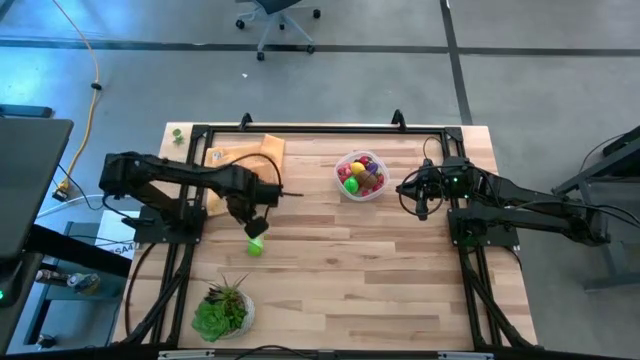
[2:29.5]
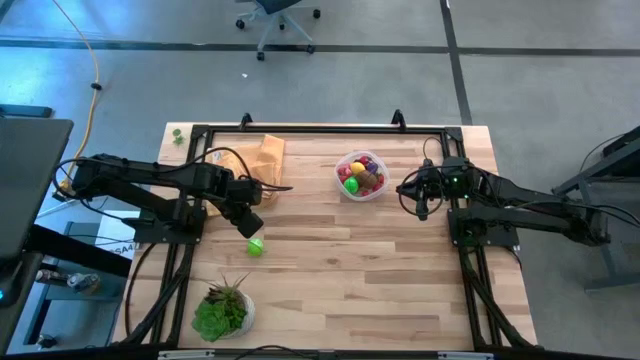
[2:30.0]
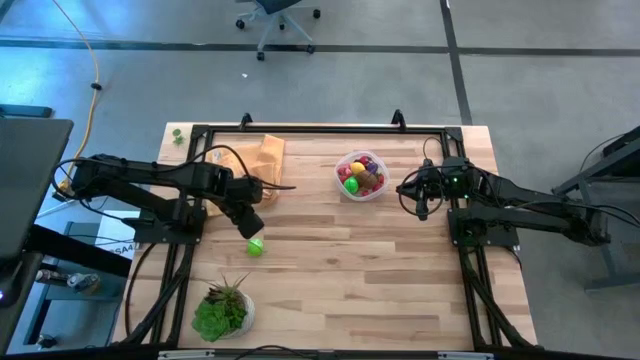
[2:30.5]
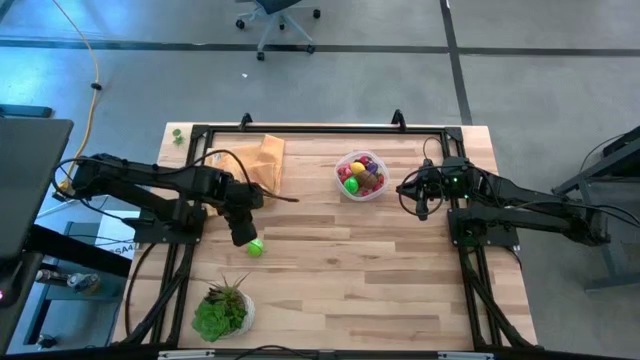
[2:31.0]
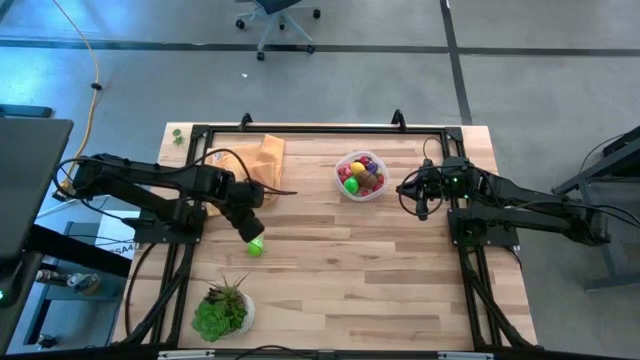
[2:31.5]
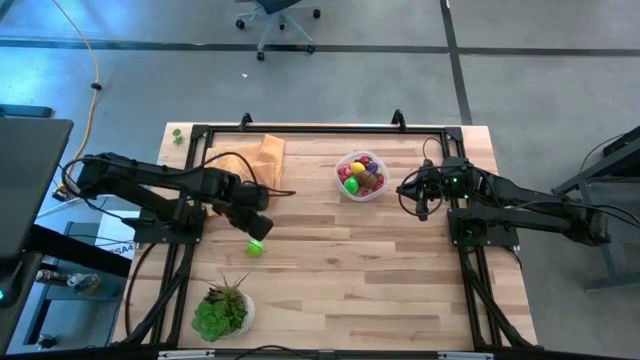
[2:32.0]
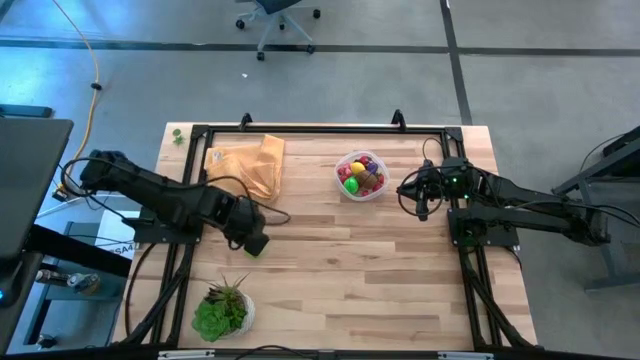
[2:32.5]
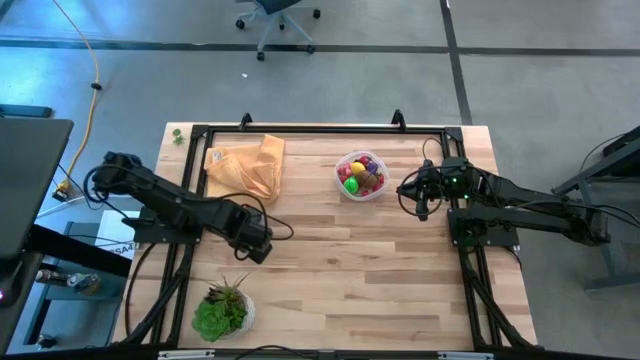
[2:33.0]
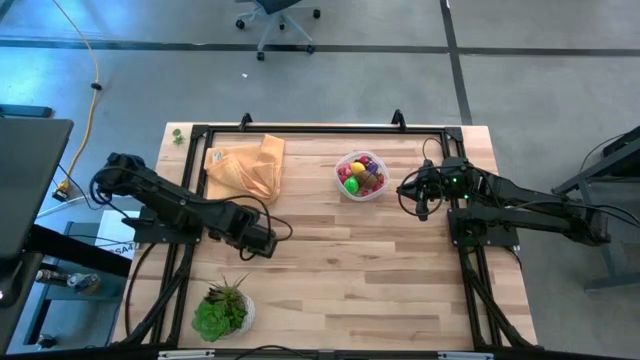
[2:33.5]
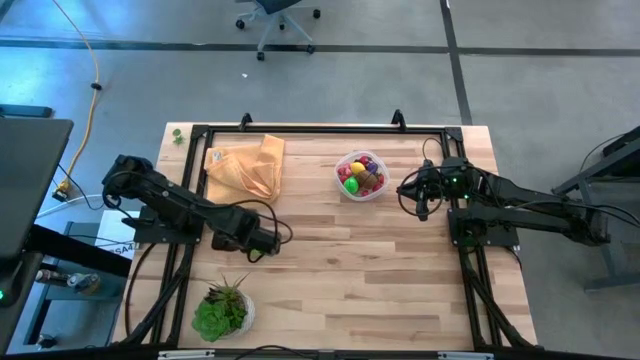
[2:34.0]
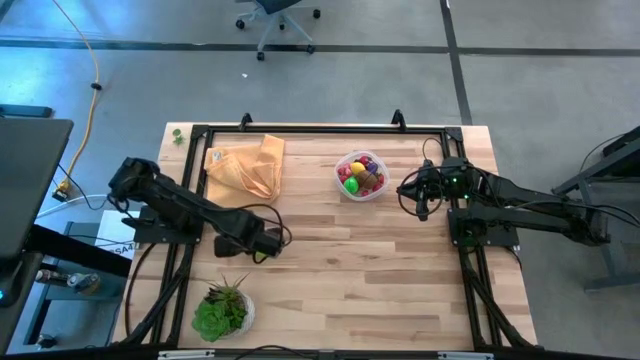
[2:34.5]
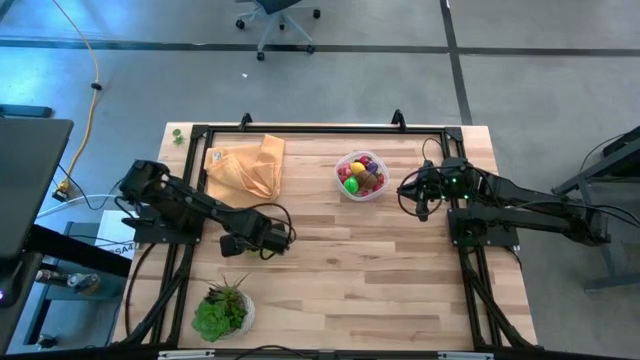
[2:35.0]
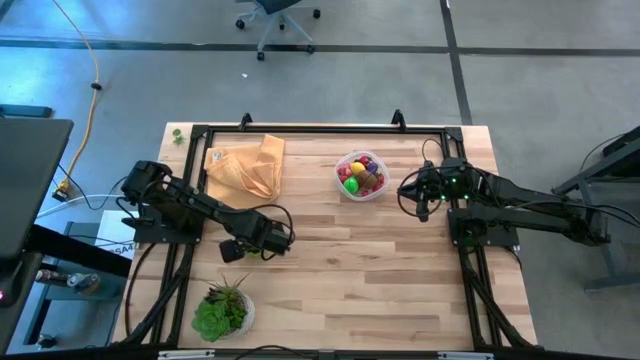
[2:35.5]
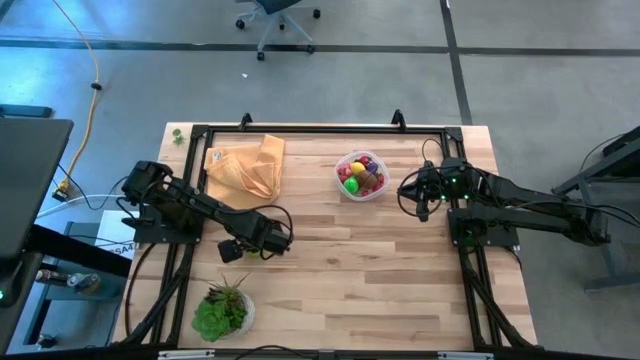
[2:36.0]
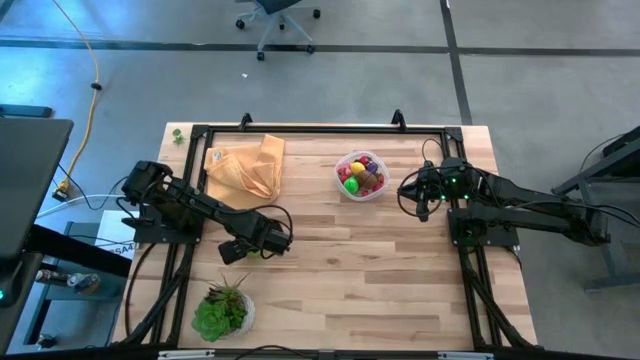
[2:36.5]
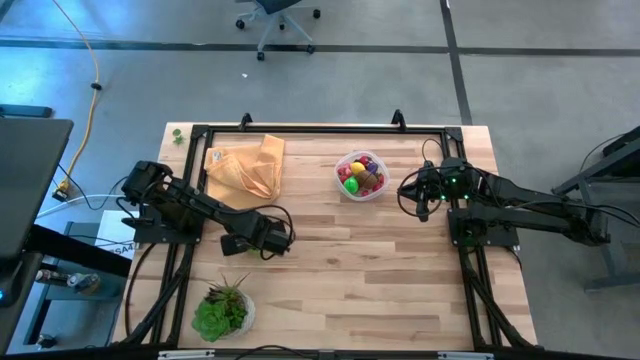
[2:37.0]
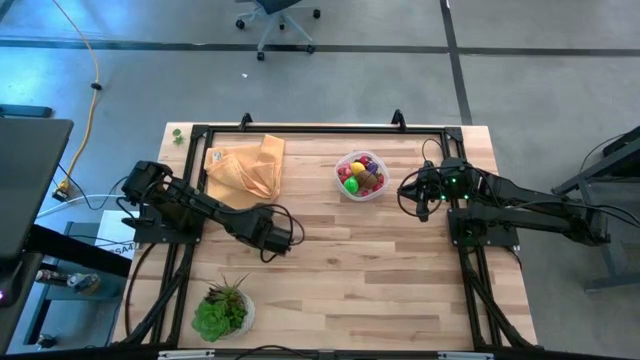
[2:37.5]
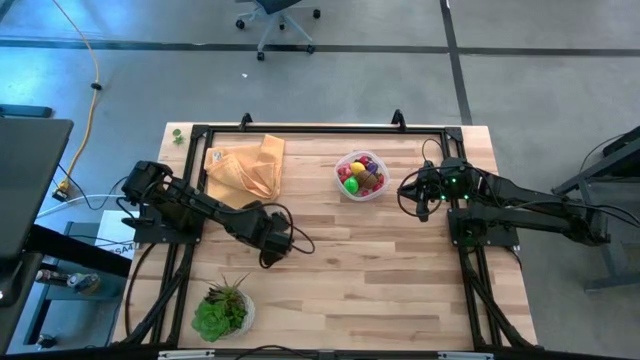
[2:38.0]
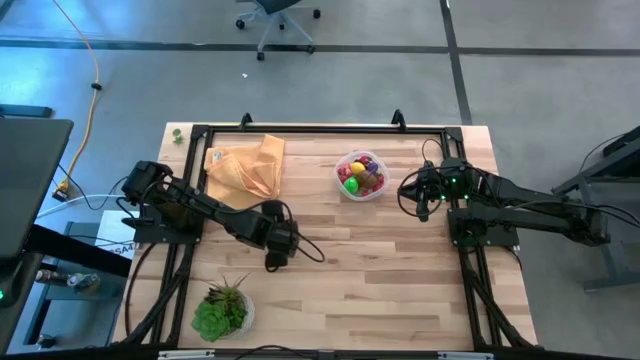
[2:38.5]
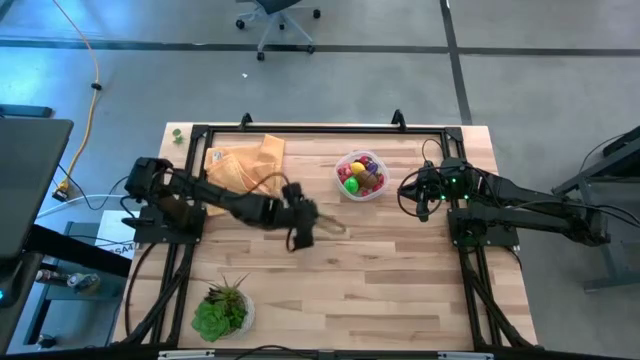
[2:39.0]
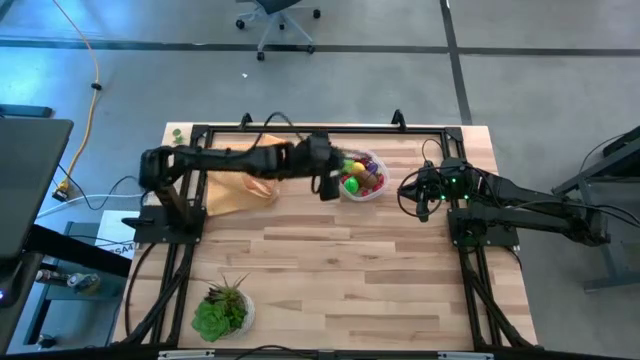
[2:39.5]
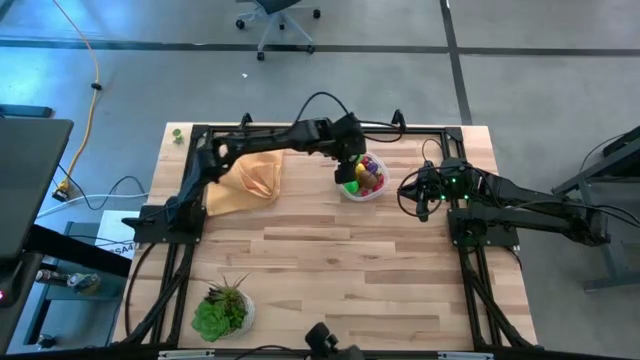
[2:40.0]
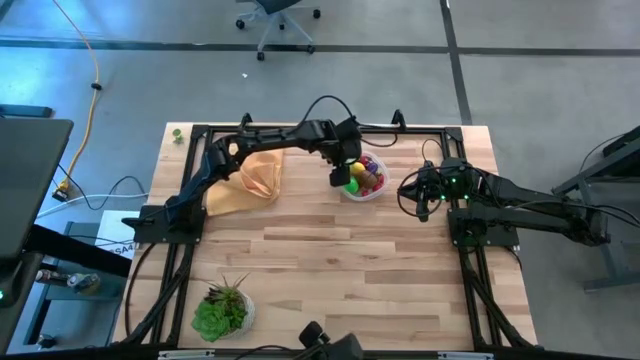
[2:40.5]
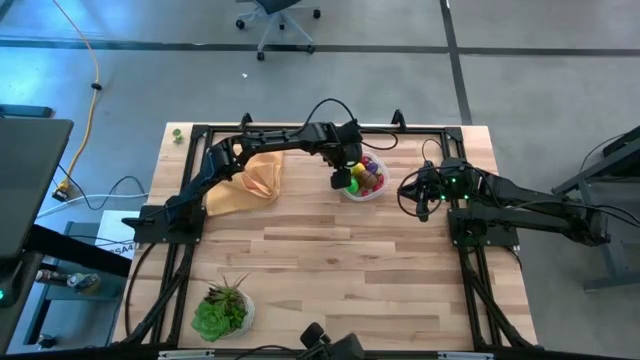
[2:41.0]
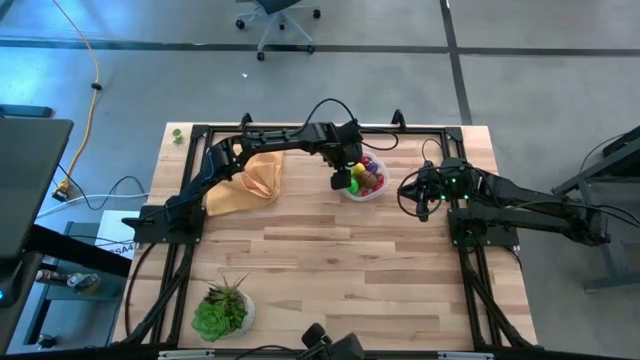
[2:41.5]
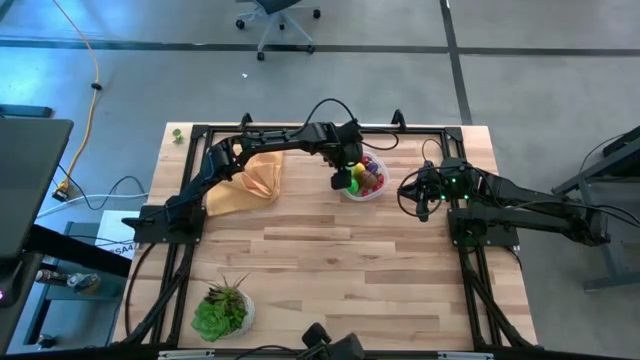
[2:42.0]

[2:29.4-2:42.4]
Task: Pick and placing Produce into tupperware
Put the green cabbage into the transparent container

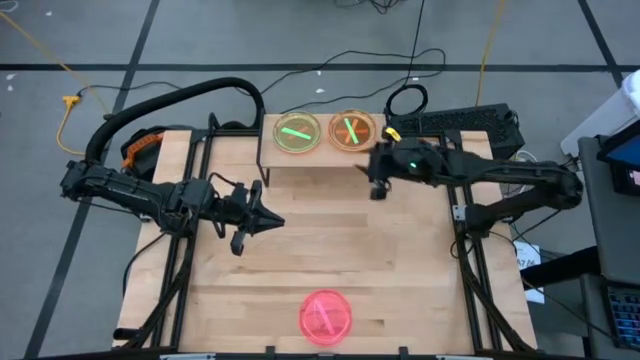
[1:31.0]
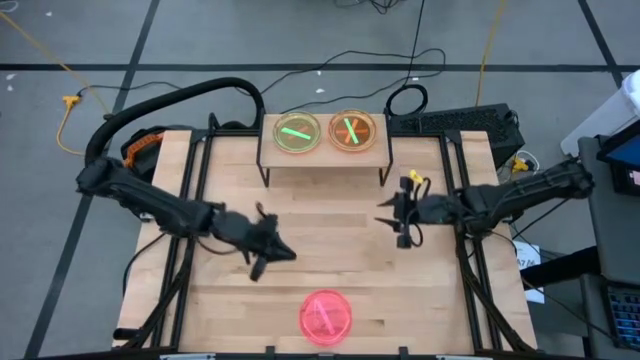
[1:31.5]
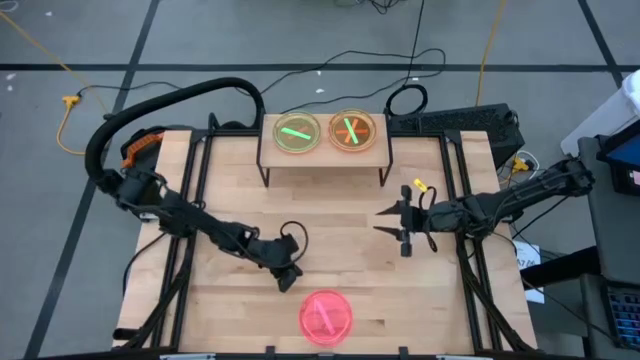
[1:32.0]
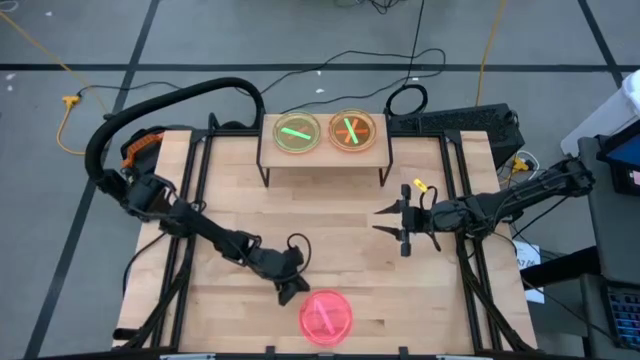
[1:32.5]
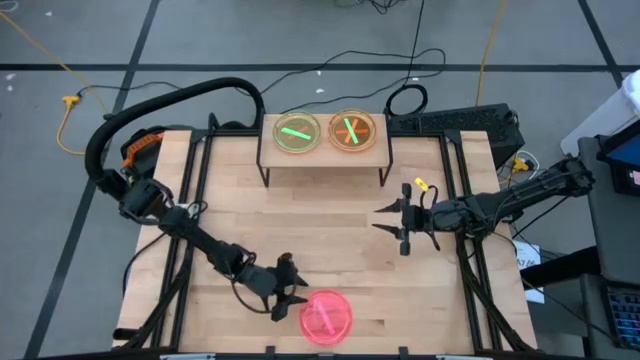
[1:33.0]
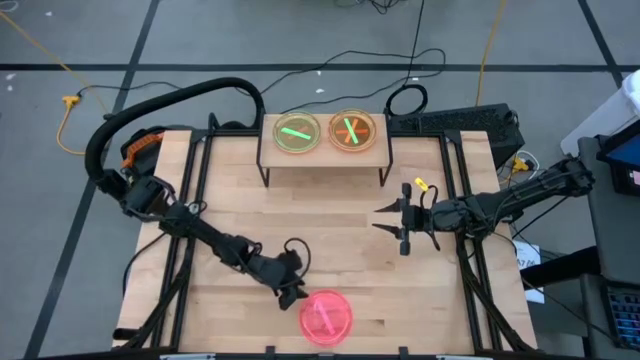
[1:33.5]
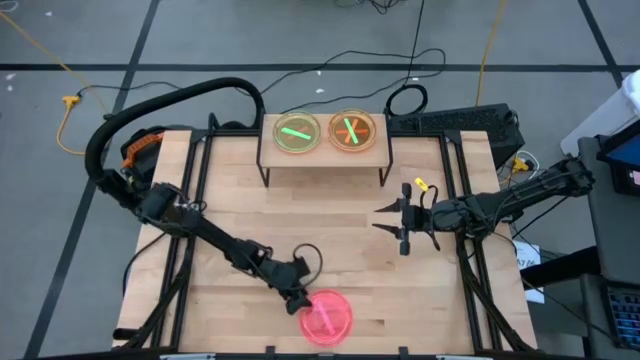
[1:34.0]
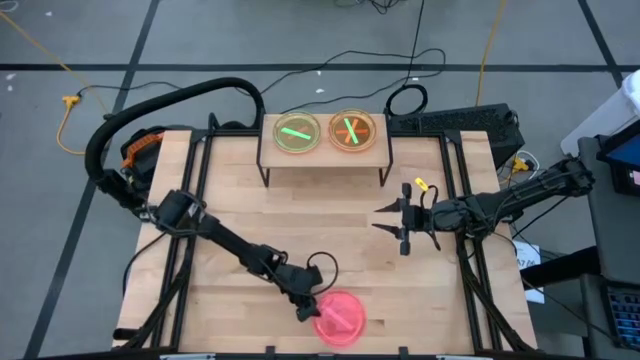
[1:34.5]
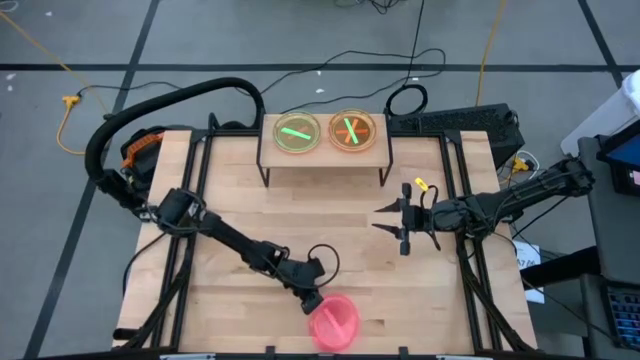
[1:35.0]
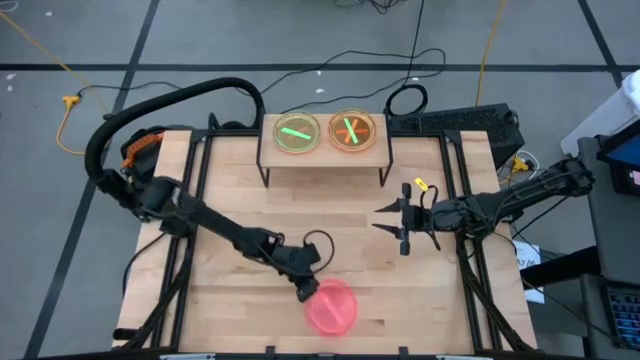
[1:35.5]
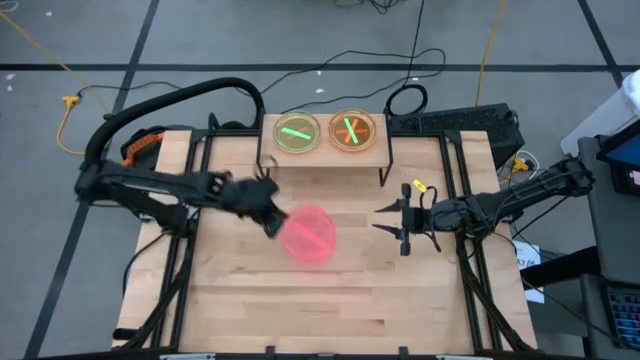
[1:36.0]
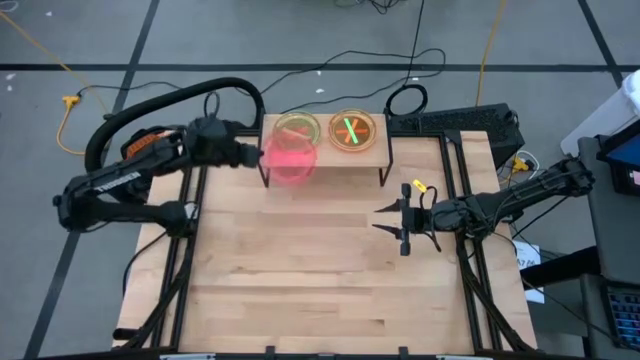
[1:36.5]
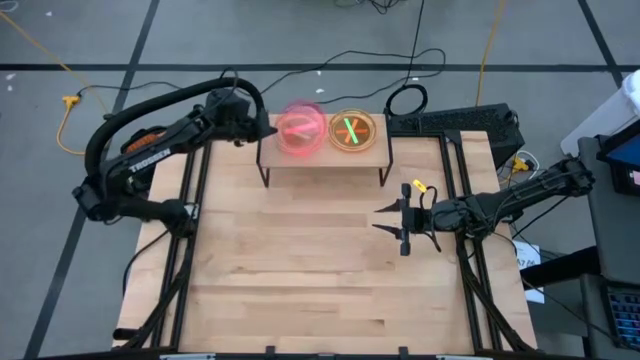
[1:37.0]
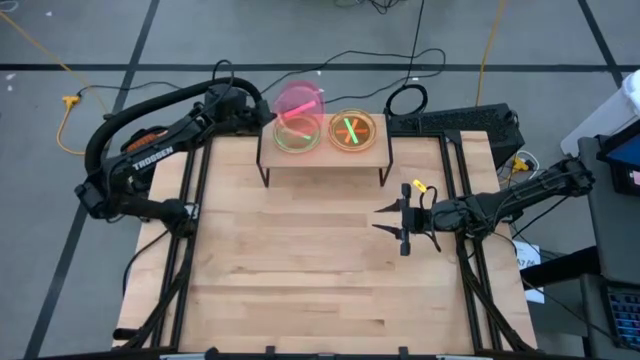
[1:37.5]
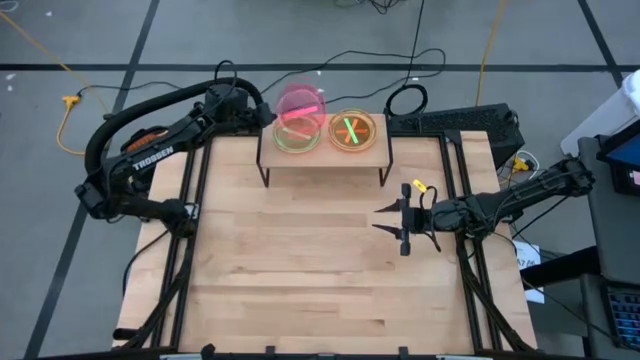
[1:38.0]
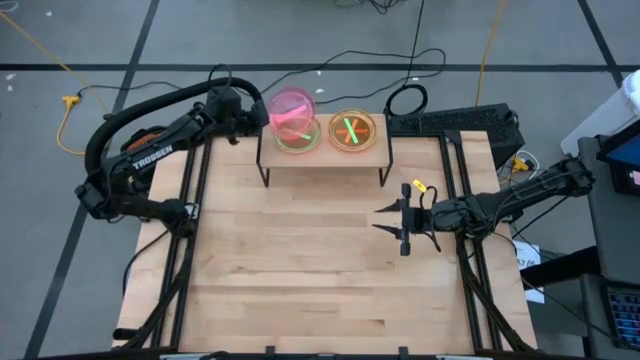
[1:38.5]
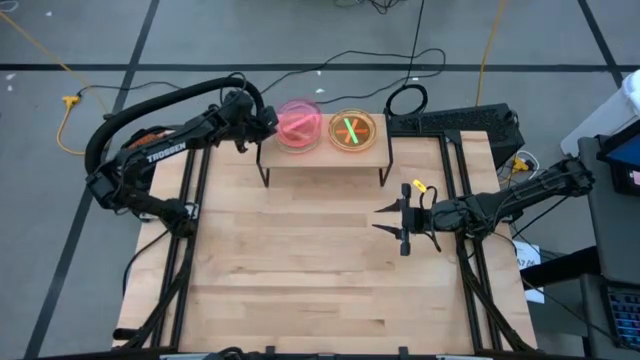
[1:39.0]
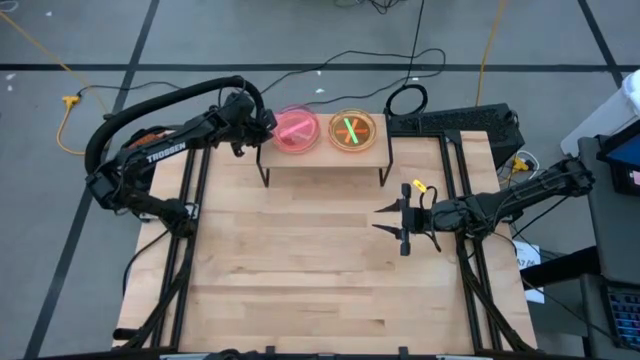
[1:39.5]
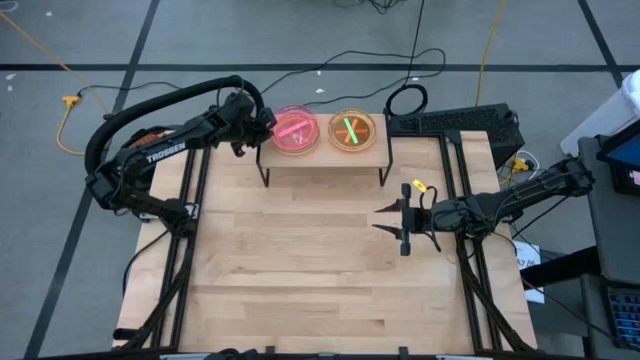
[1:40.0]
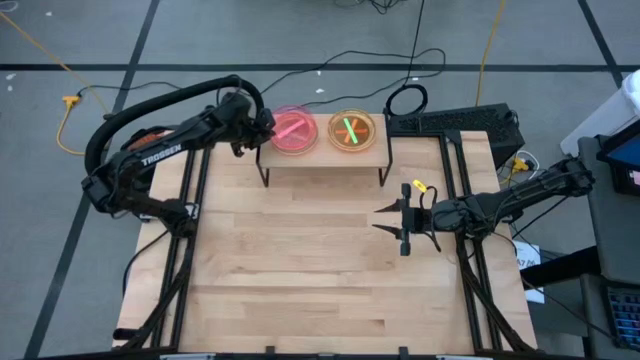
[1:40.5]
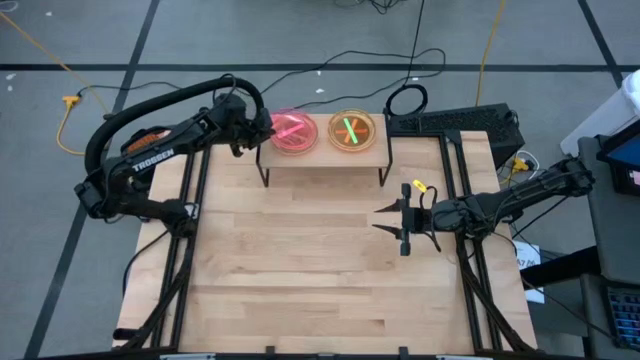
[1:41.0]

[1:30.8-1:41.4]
Task: Place and stack plates onto a shelf
Stack the pink plate on top of the green plate on the shelf
